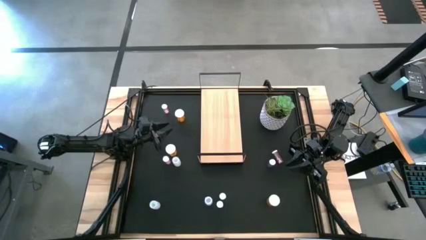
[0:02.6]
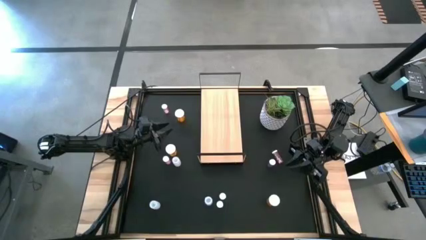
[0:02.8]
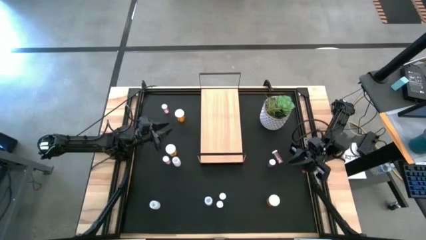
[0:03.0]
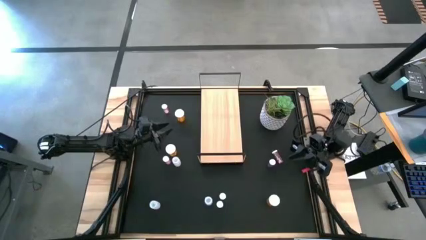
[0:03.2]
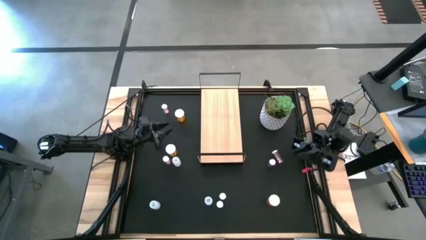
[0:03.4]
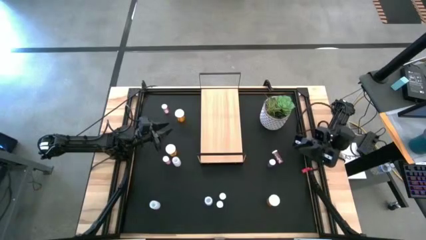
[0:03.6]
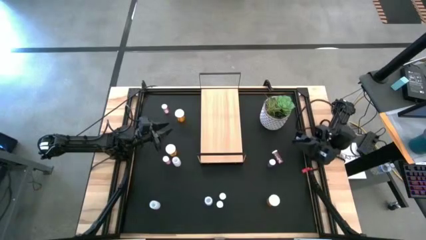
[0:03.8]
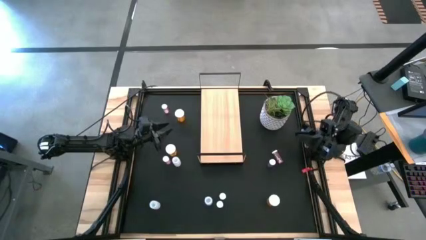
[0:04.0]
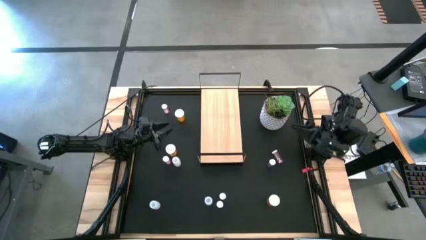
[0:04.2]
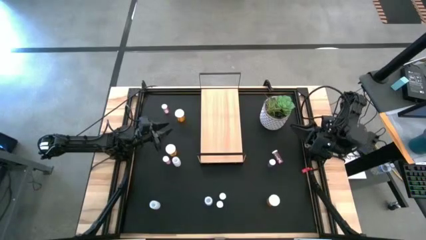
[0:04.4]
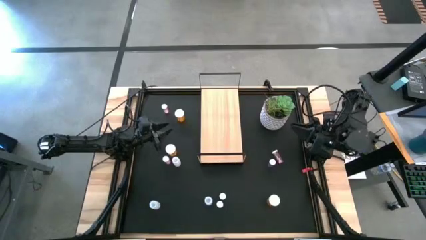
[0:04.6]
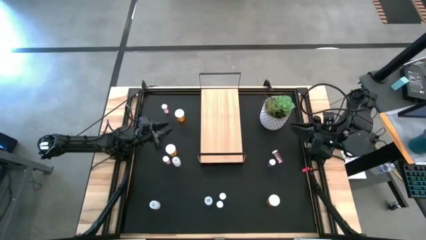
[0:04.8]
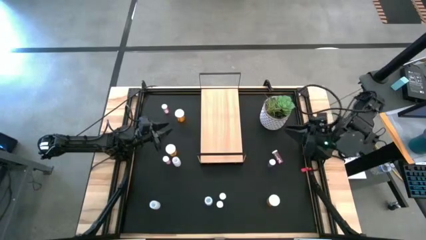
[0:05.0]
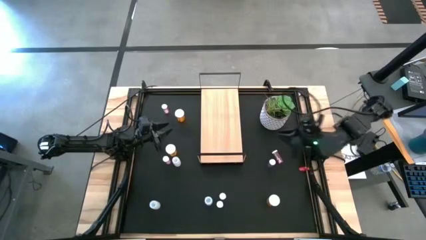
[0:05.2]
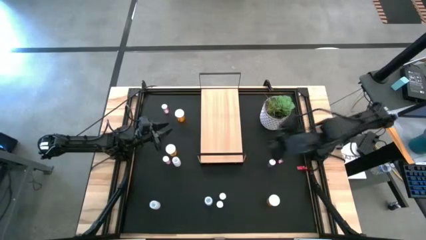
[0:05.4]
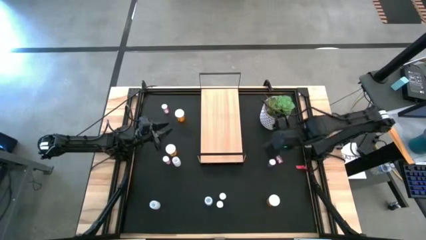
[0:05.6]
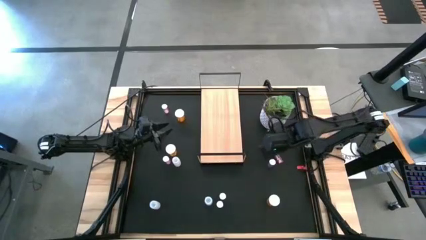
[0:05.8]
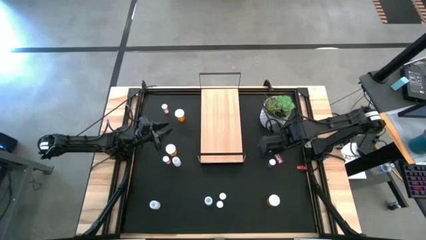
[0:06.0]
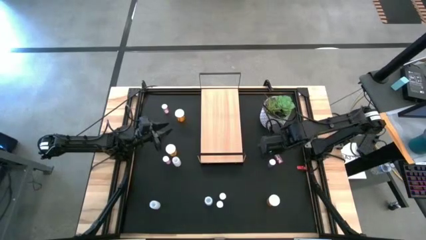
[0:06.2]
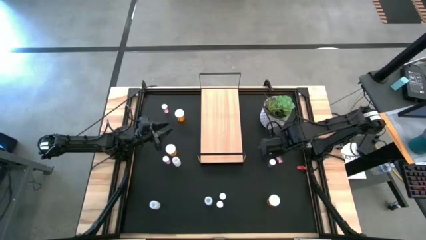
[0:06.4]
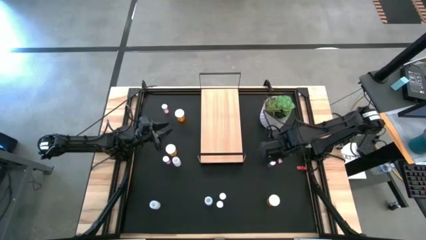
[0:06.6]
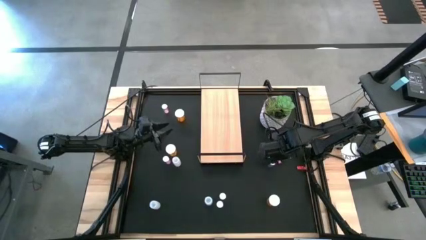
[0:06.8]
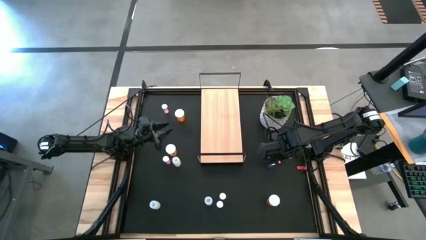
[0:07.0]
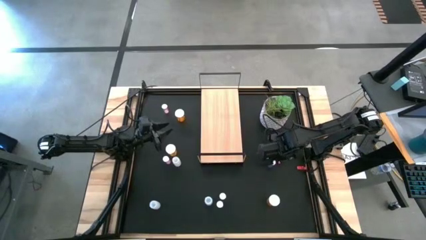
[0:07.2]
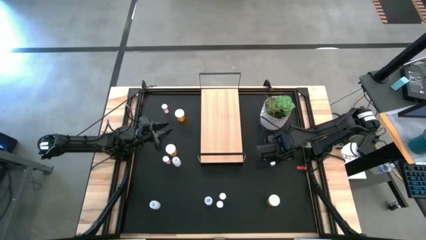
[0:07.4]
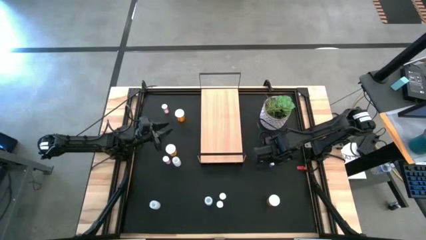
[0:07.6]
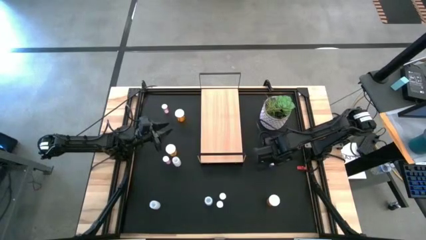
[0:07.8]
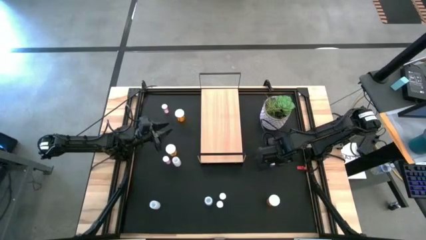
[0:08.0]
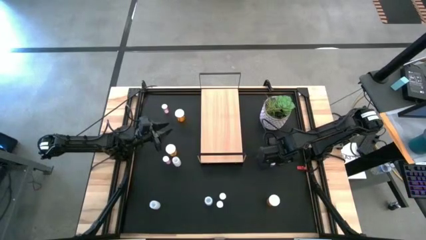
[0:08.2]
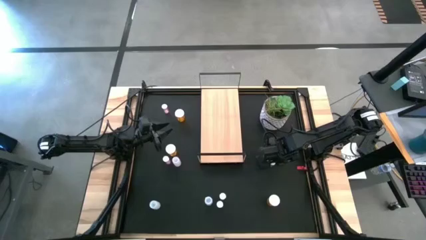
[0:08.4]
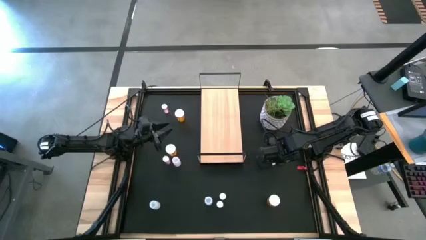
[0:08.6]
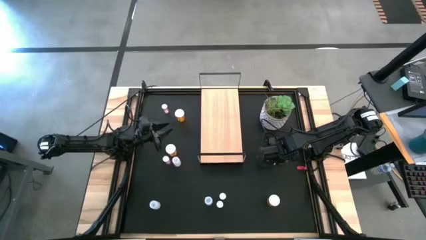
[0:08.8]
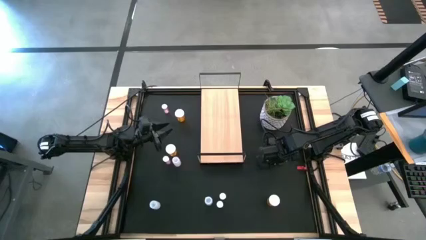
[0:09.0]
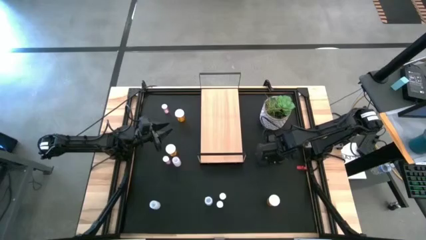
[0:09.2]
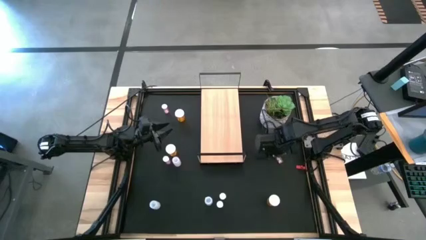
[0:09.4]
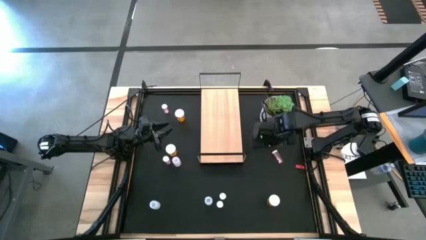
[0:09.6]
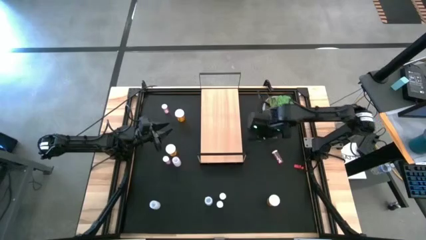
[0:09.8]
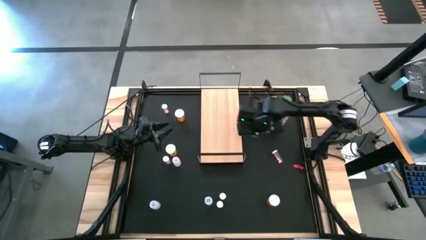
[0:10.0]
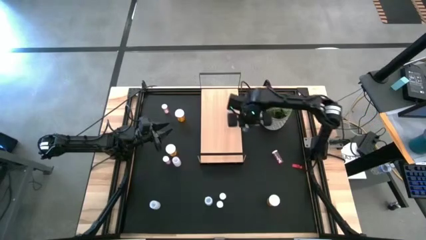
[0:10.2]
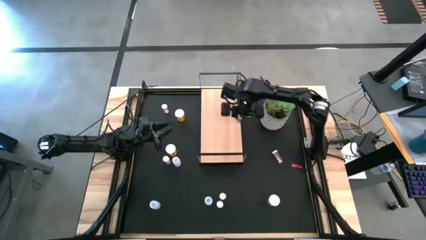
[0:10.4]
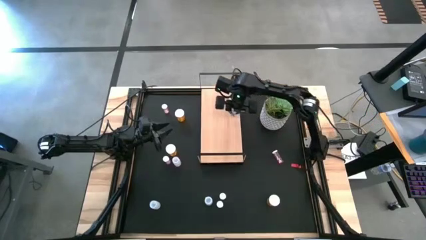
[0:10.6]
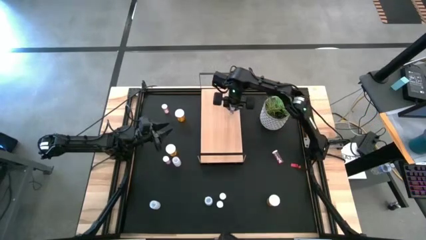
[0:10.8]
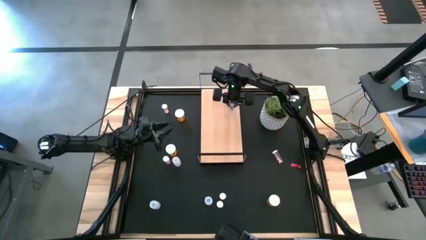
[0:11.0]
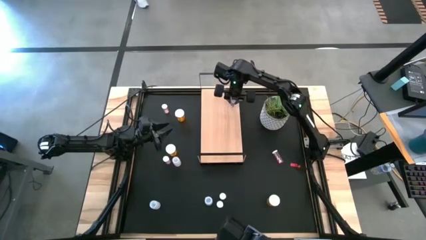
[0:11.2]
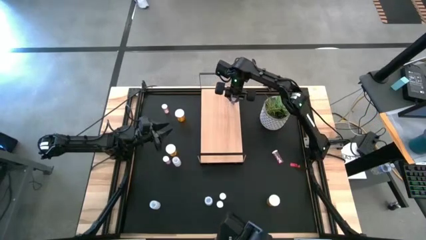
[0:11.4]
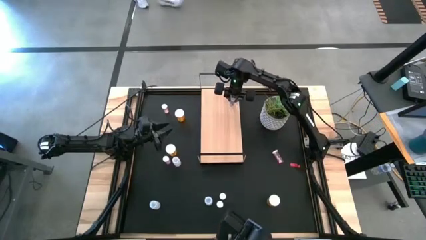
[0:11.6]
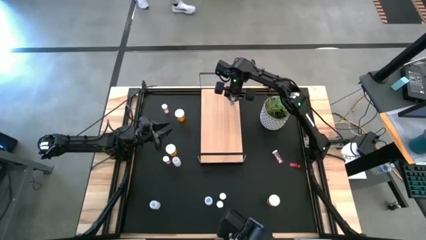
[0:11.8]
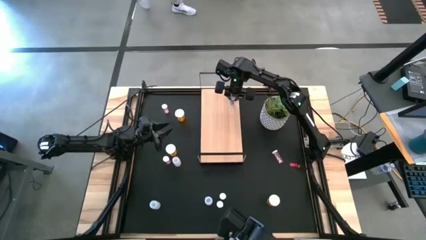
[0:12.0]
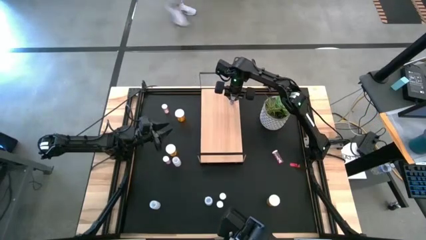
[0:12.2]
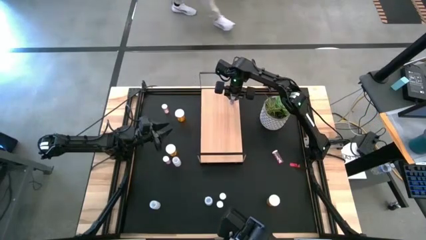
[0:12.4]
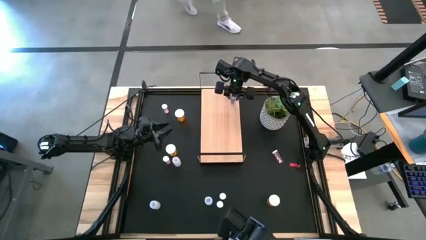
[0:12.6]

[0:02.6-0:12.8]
Task: Pick and place medicine bottles onto shelf by color
Put the top blue pill bottle on the shelf

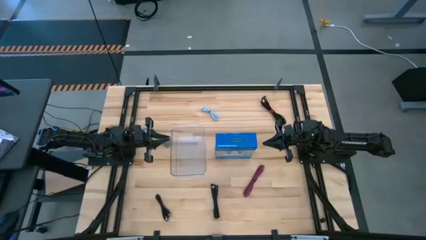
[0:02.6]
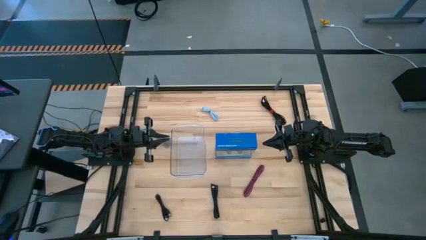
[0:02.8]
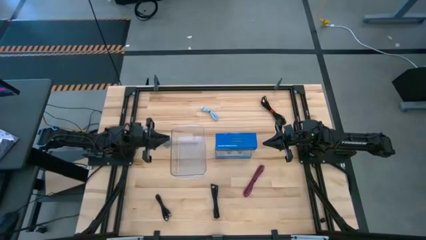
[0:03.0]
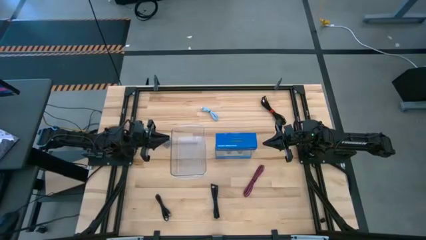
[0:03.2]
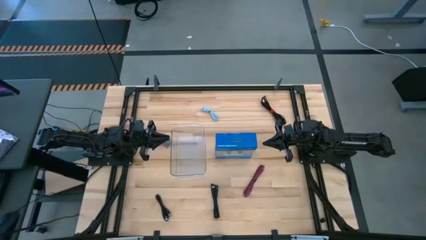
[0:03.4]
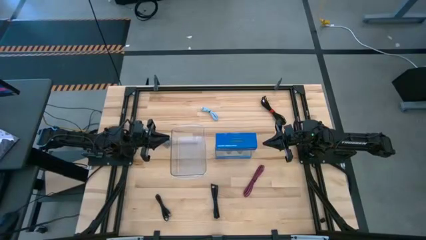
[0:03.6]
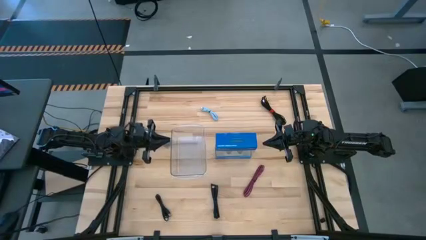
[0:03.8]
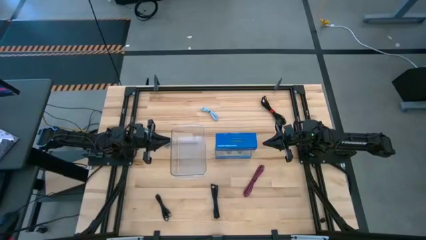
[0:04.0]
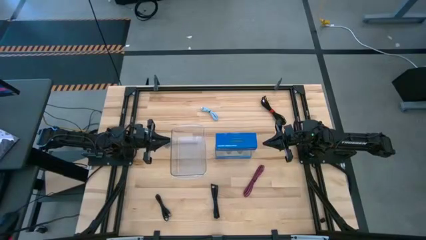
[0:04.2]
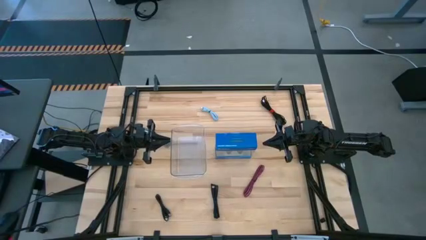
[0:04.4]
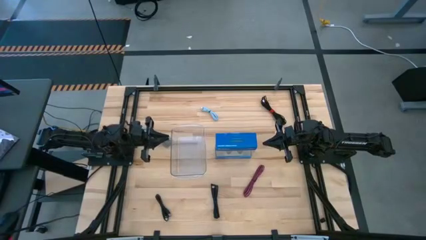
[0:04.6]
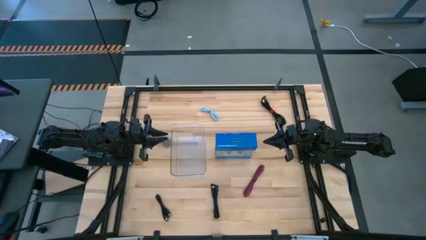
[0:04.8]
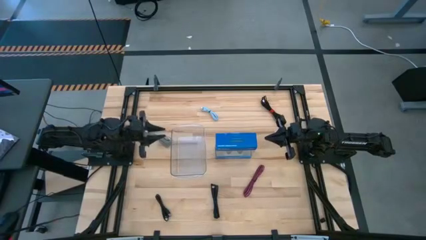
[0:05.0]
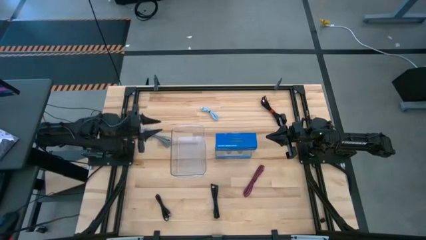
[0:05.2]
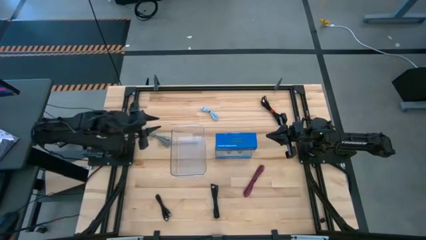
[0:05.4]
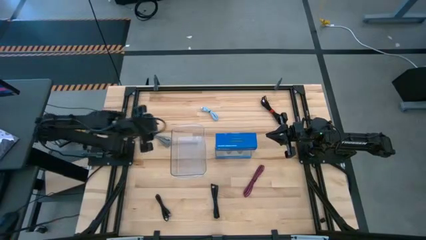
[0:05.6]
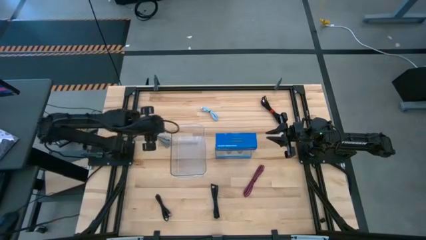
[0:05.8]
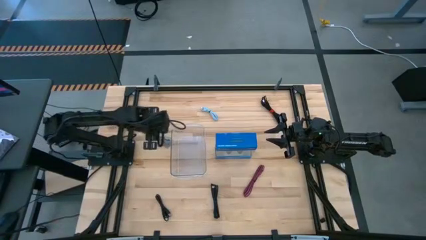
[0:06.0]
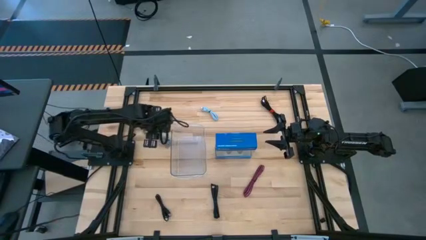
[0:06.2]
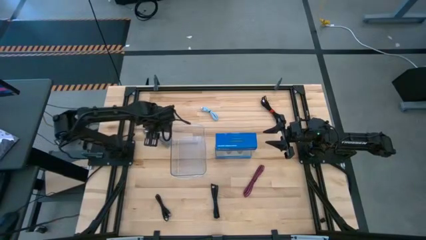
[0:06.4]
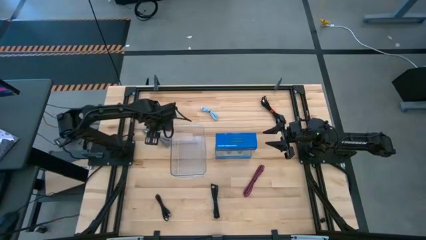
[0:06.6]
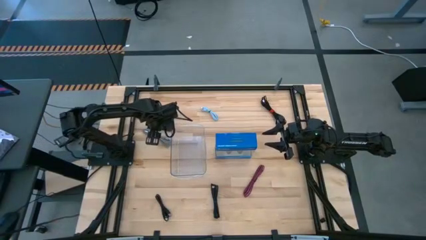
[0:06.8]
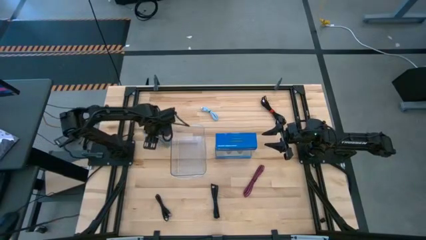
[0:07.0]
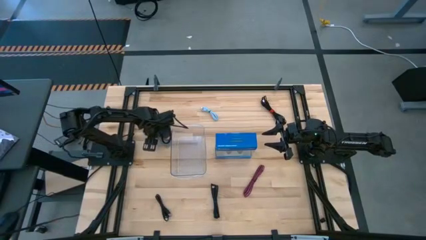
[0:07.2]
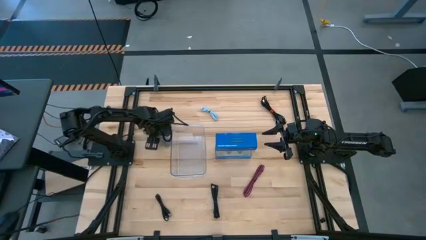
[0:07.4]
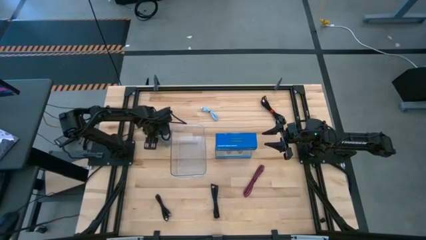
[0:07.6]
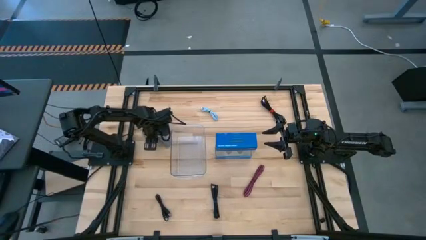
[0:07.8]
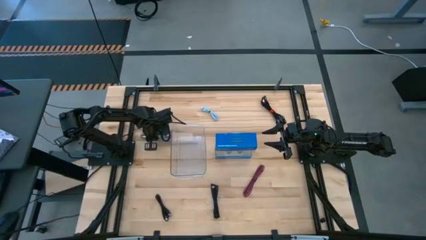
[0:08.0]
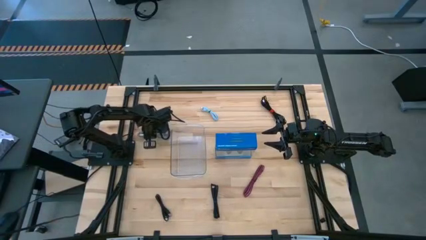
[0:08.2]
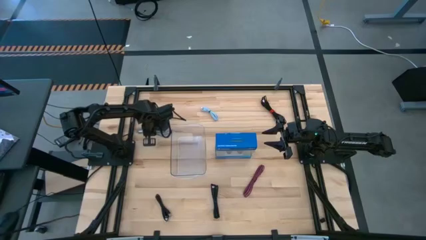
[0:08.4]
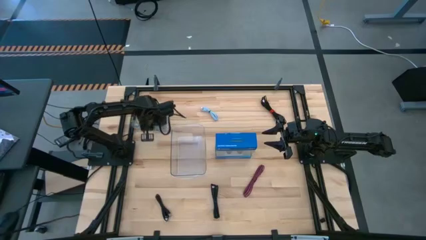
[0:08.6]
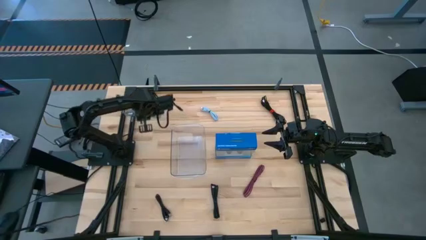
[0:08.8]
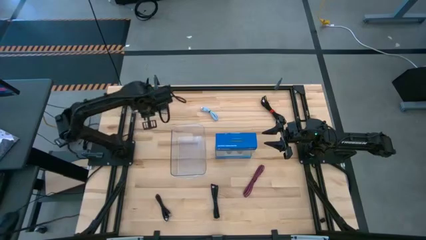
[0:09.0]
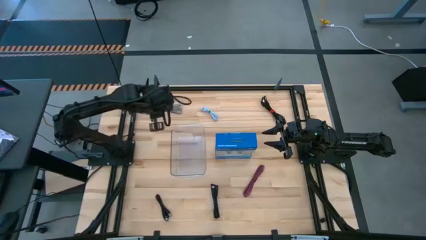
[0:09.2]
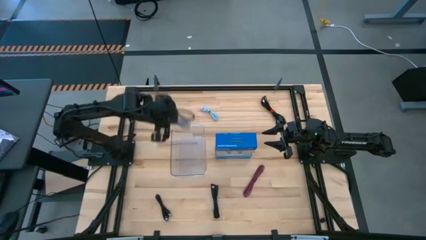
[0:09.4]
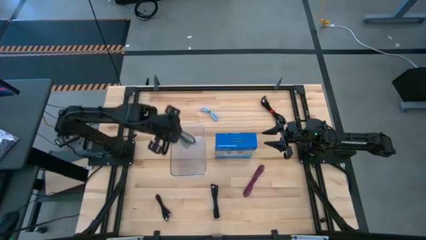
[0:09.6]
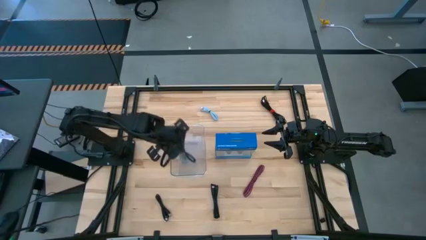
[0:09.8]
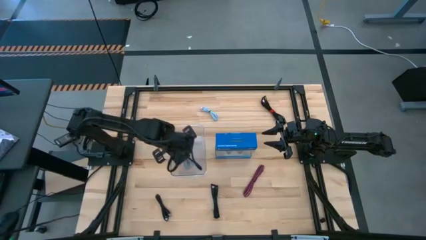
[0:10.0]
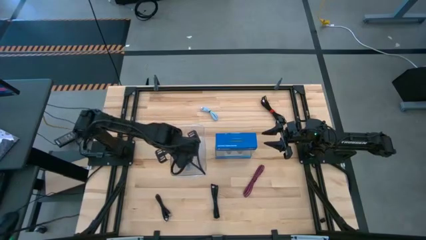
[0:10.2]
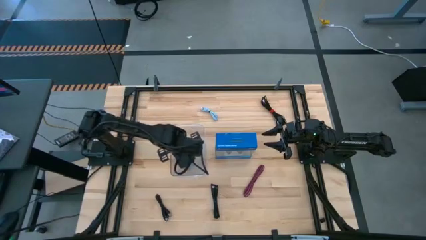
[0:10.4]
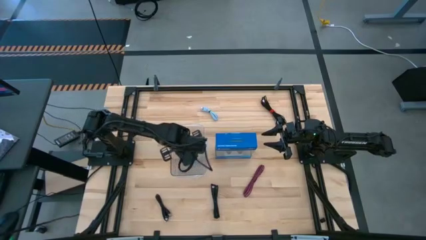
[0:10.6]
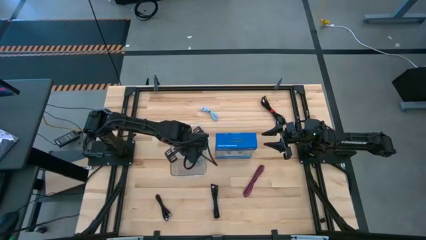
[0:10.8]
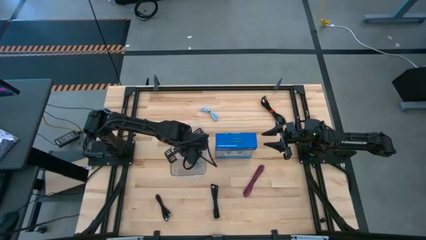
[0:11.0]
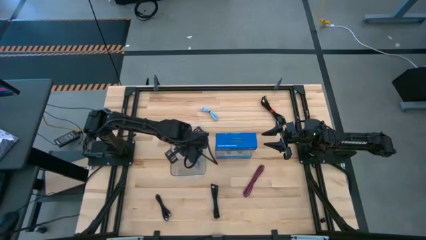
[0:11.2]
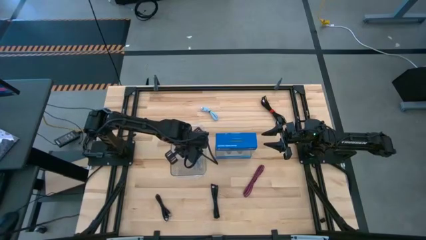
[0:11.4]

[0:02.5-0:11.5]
Task: Pick and place USB-C Cables
Put the white charger cable into the transparent bin
